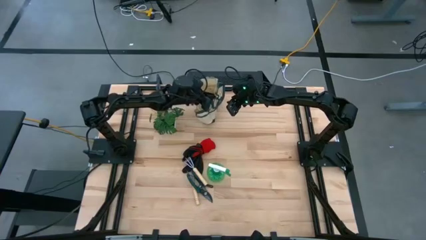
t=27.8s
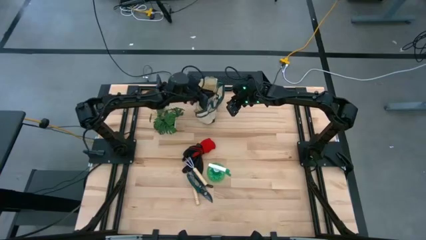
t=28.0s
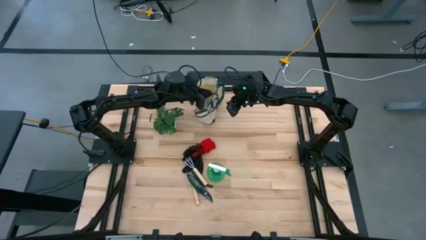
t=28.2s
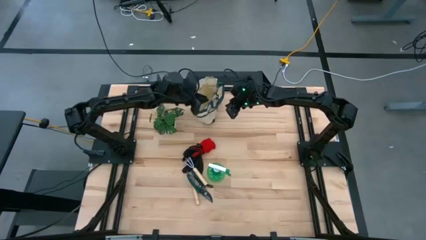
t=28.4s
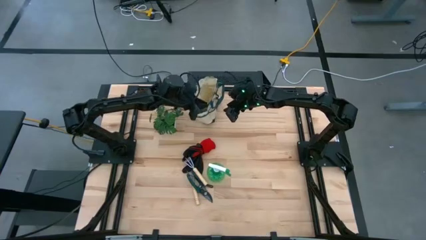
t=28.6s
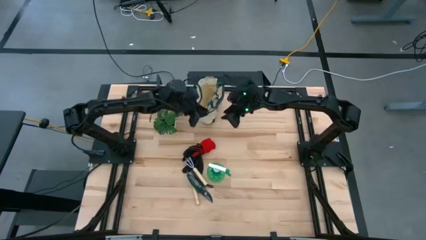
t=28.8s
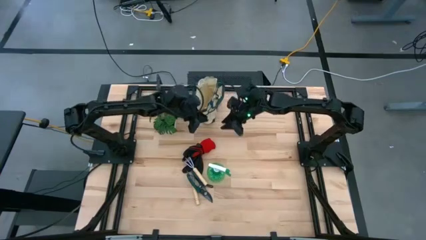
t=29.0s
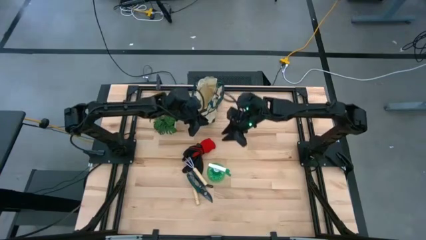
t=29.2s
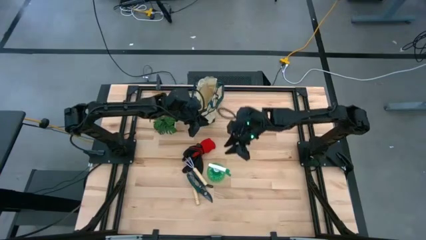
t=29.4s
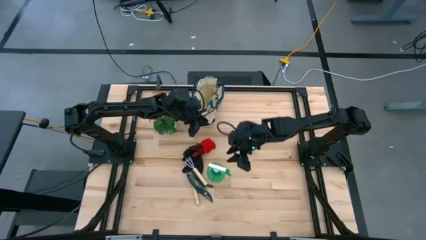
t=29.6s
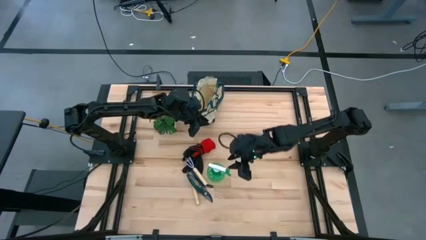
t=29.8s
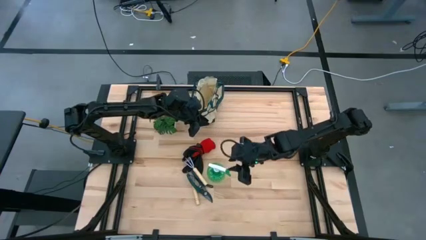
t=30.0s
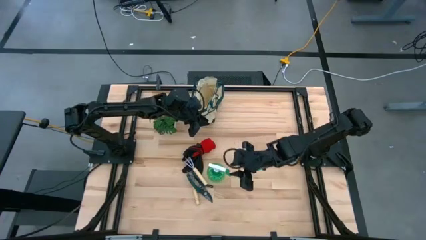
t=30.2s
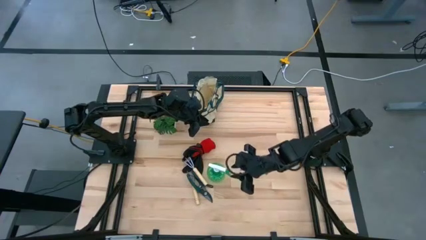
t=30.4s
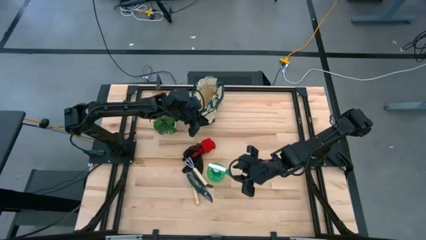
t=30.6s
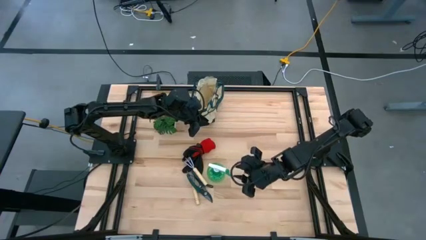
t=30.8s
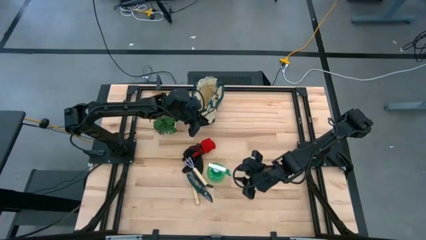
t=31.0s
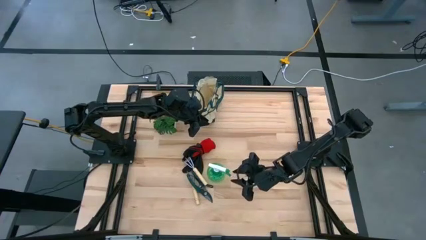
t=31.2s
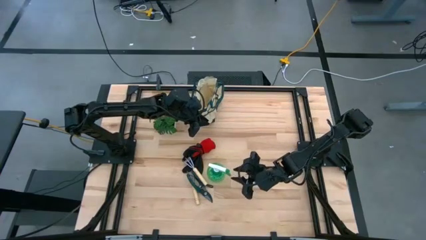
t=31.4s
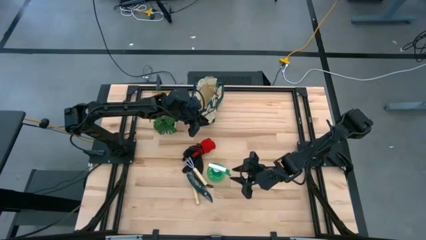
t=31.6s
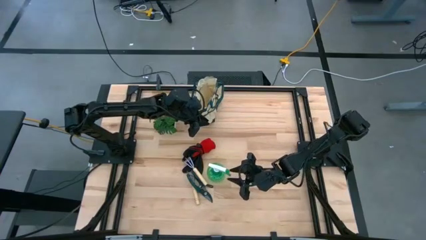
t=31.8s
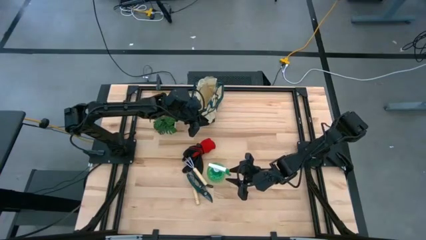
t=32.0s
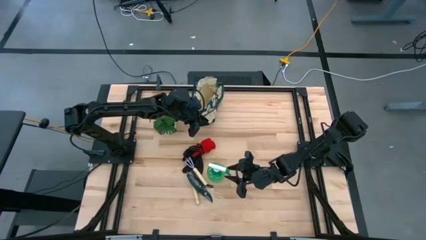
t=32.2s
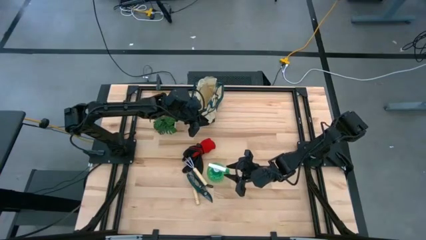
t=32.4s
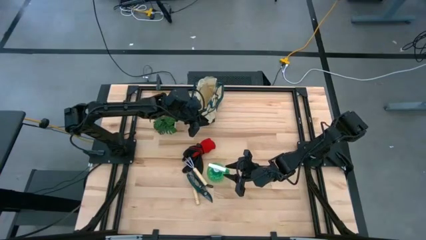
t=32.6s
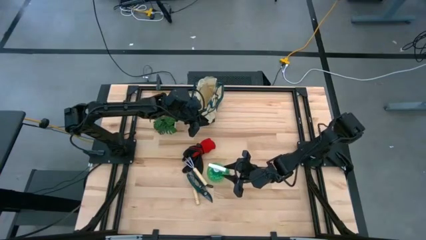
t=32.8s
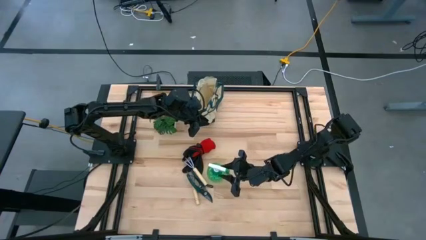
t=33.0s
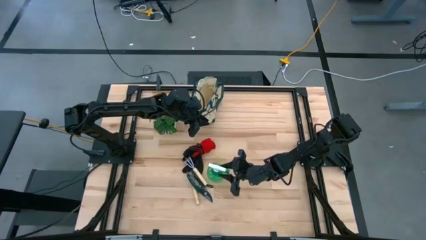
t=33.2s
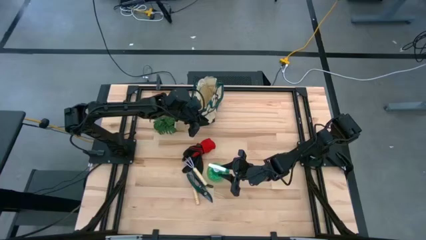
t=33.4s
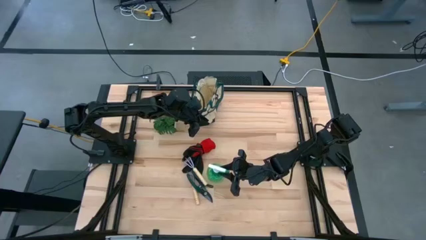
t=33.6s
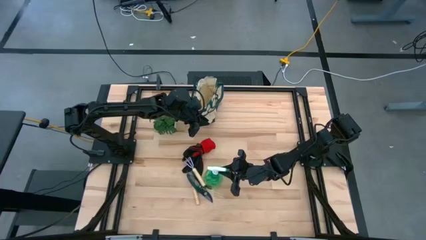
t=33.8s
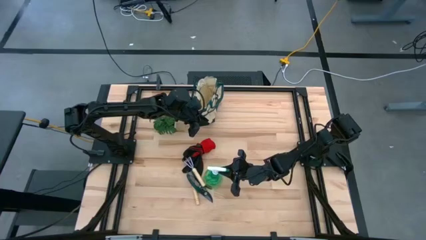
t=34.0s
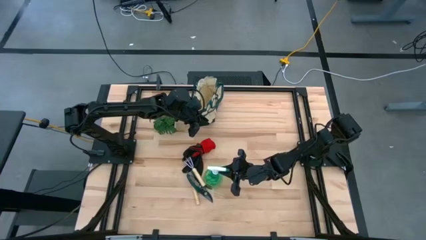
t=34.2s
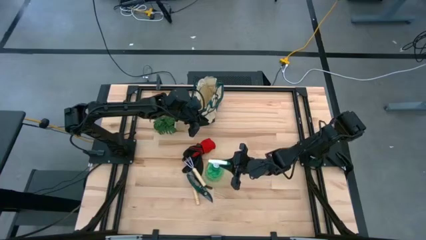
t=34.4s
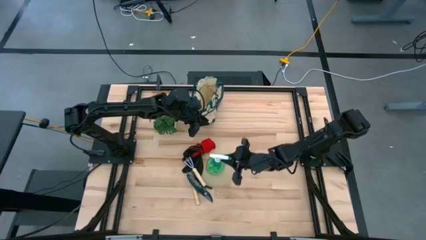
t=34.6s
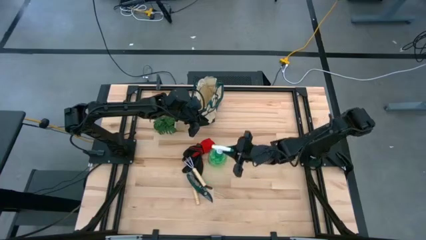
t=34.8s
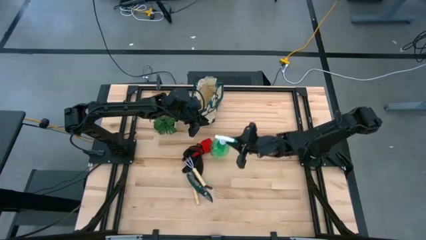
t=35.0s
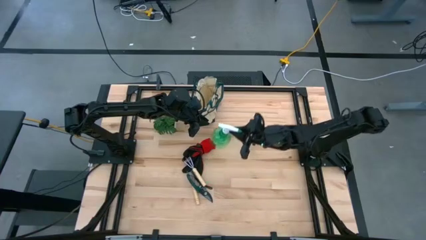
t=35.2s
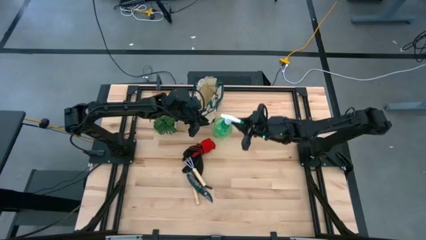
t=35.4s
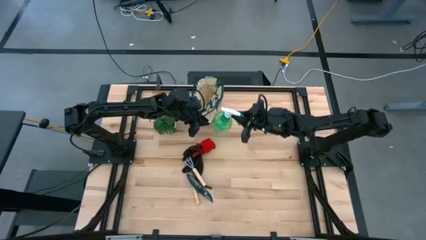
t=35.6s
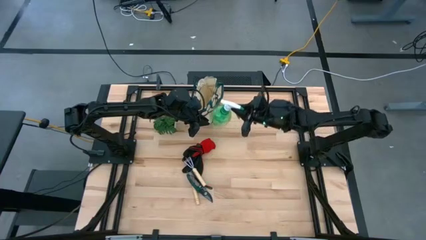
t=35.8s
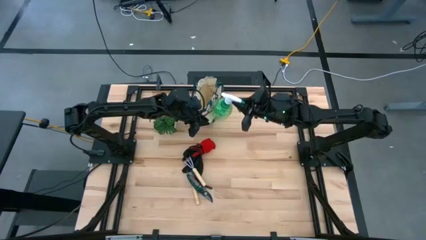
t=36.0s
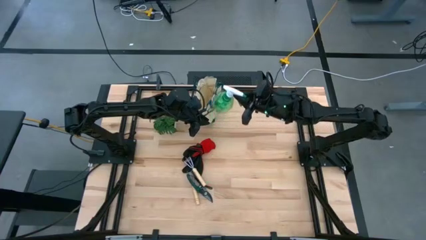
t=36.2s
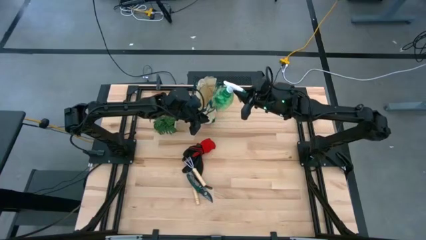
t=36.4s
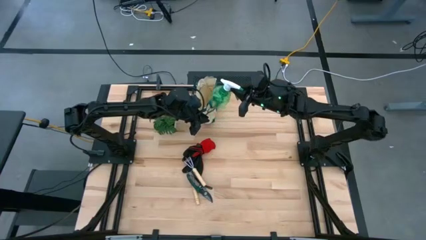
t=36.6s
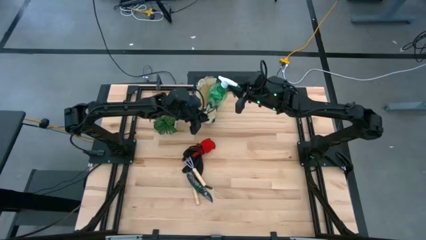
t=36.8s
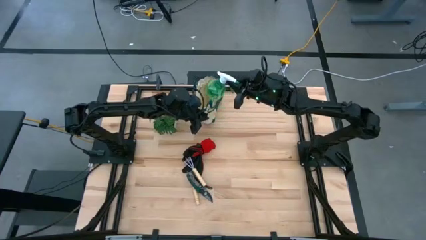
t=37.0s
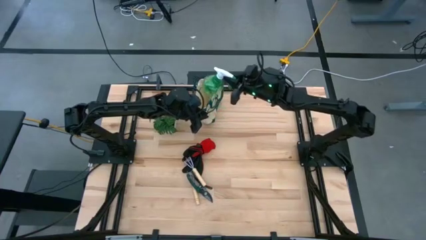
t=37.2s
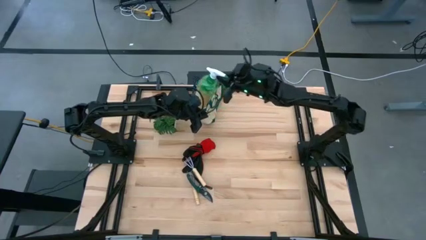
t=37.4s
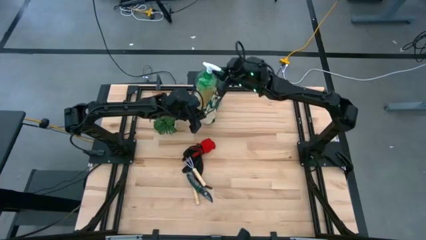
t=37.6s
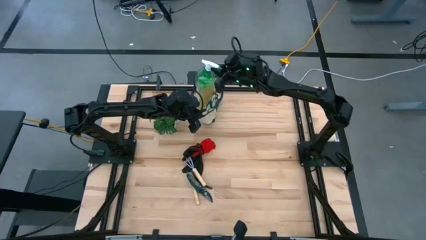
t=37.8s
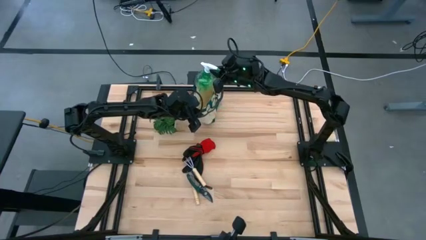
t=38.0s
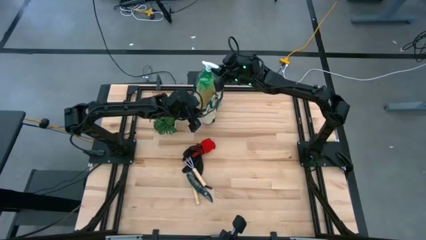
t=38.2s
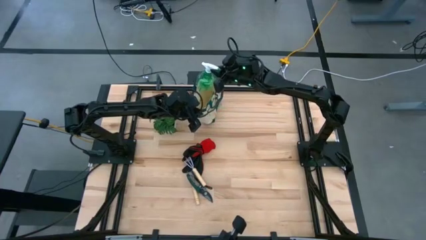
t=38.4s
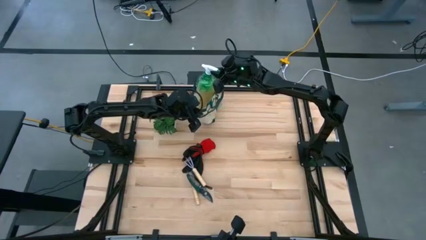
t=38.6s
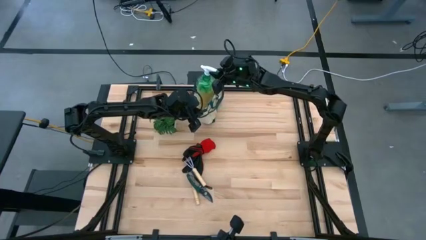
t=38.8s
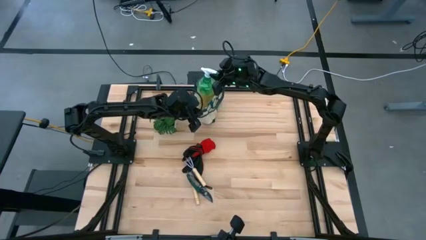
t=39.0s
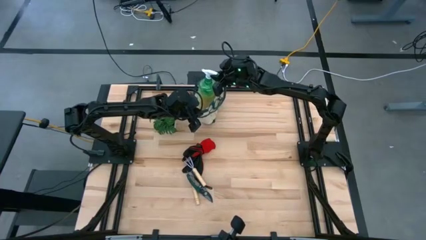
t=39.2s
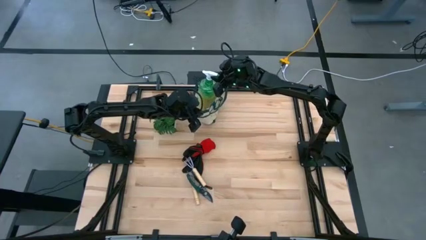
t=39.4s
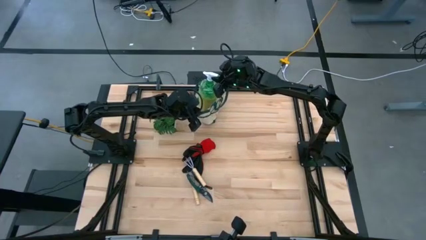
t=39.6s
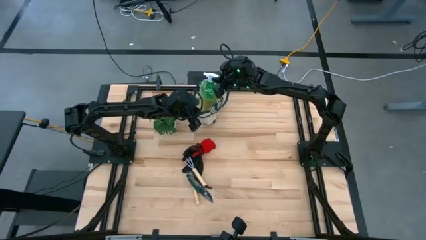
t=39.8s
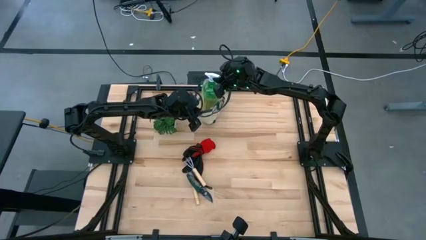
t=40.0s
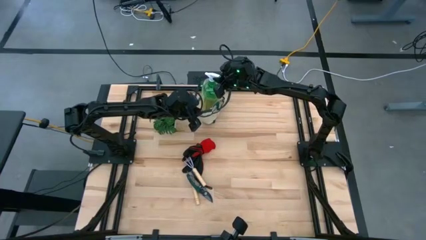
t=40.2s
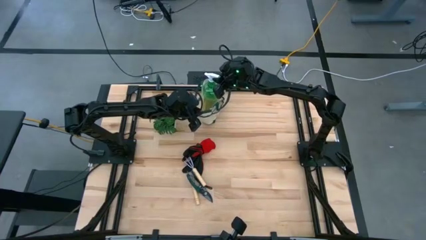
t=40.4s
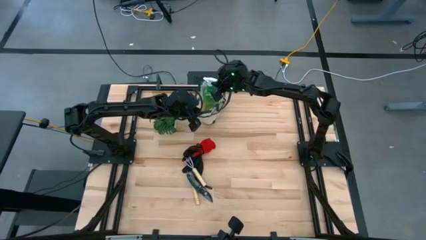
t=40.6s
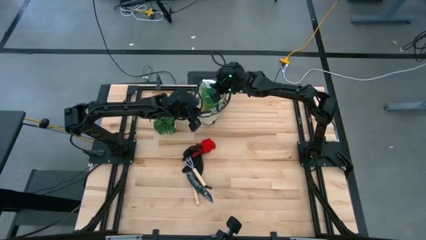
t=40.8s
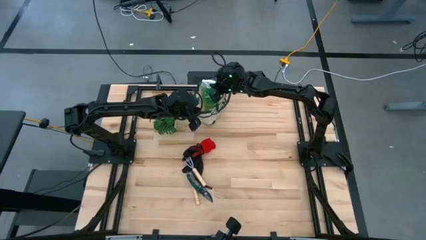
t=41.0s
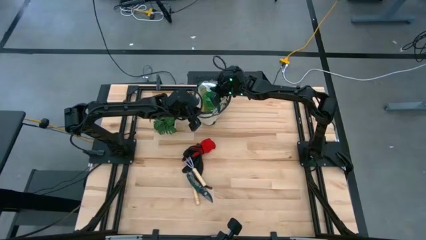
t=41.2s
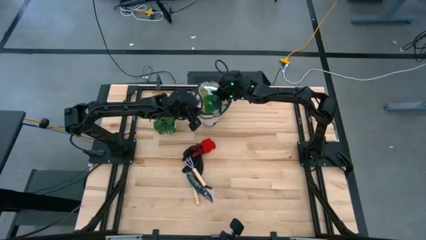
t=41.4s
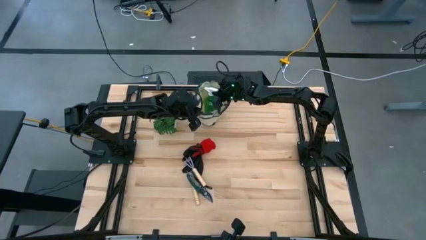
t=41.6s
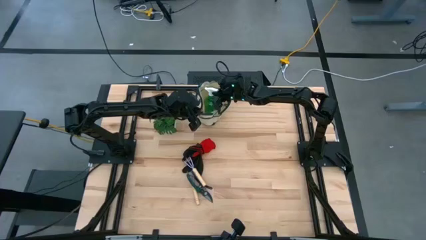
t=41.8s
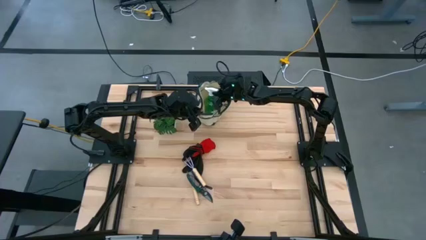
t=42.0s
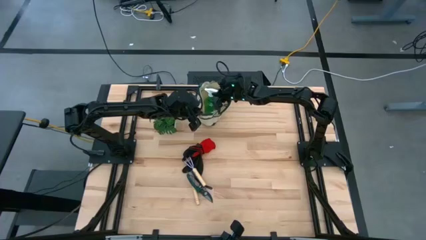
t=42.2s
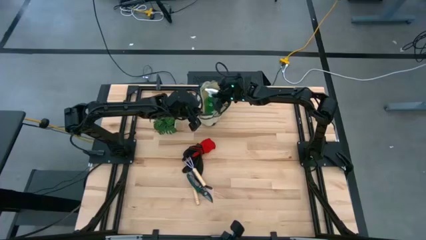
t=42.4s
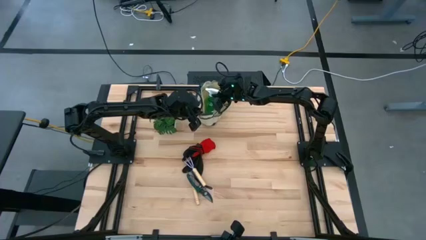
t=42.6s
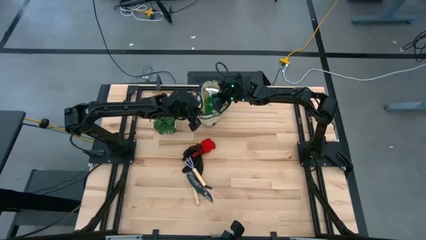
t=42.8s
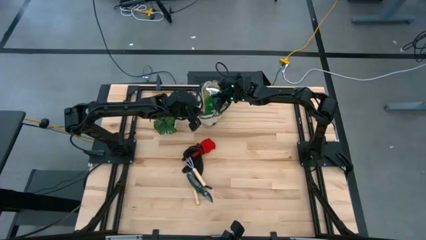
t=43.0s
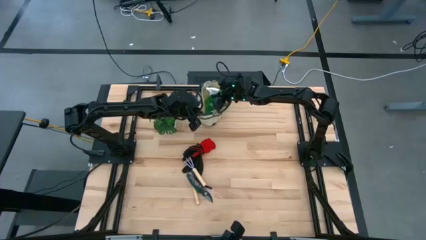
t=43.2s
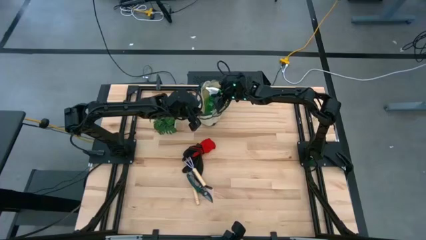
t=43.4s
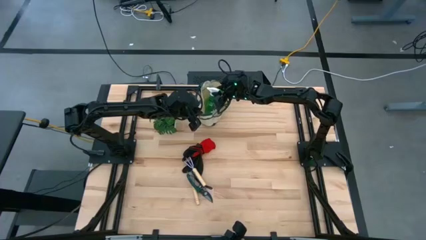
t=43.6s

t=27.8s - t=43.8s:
Task: Pick & Place Garden tools in Gardening bag
Put the green spray bottle into the white gardening bag
